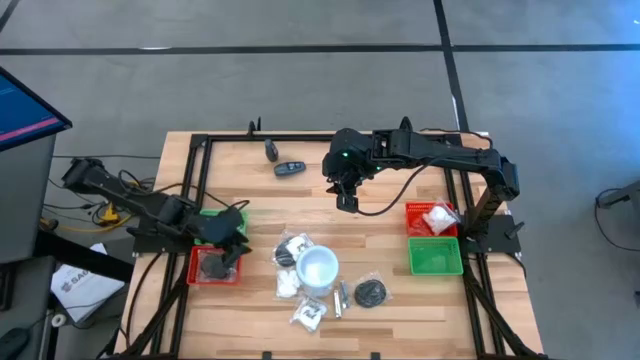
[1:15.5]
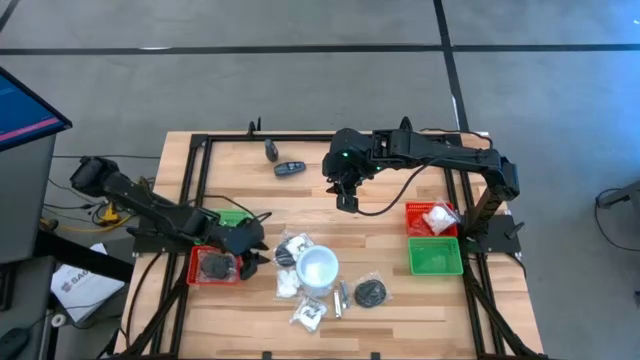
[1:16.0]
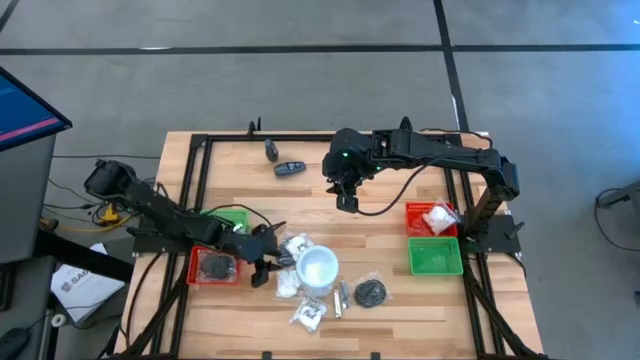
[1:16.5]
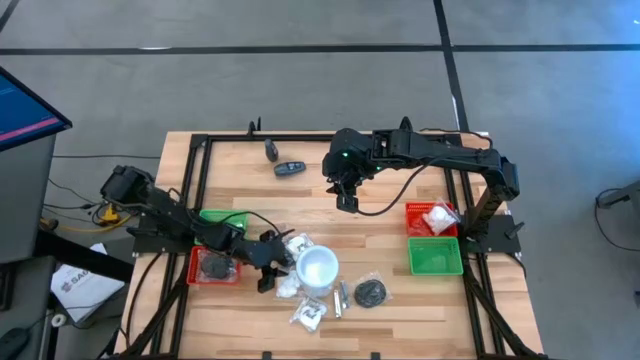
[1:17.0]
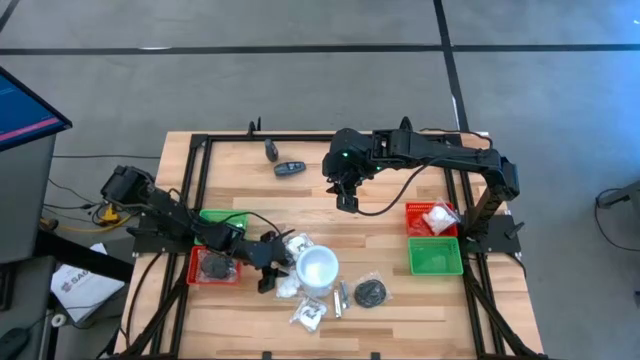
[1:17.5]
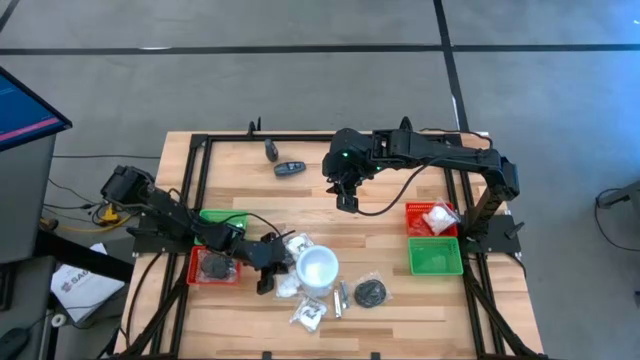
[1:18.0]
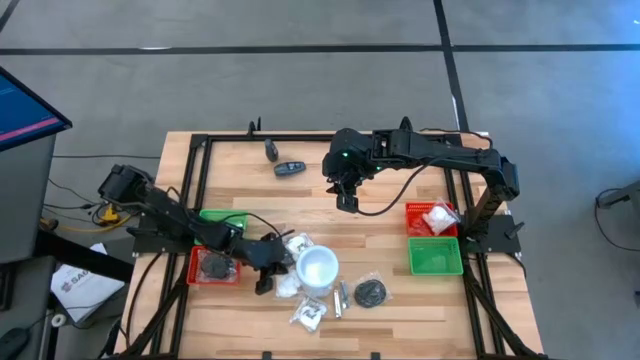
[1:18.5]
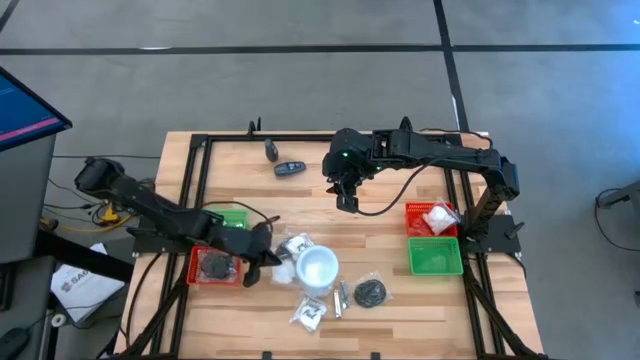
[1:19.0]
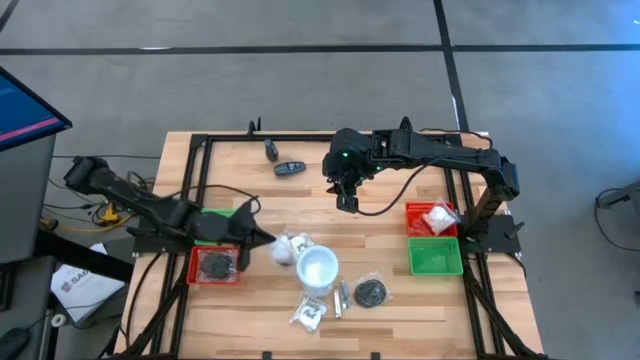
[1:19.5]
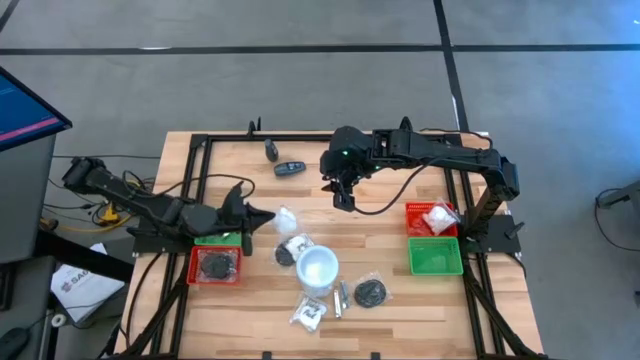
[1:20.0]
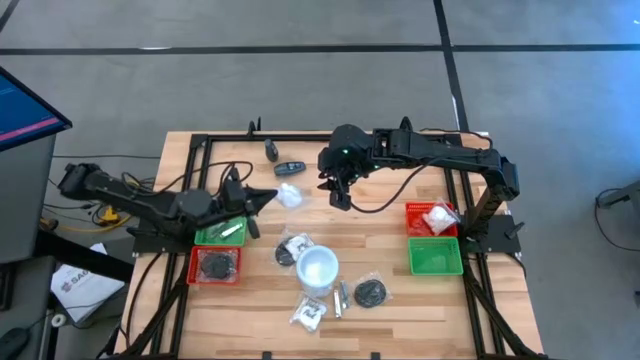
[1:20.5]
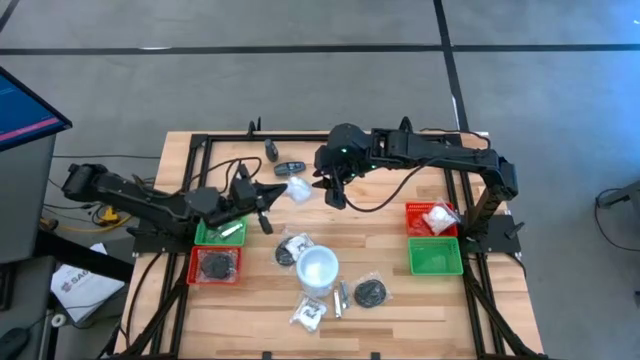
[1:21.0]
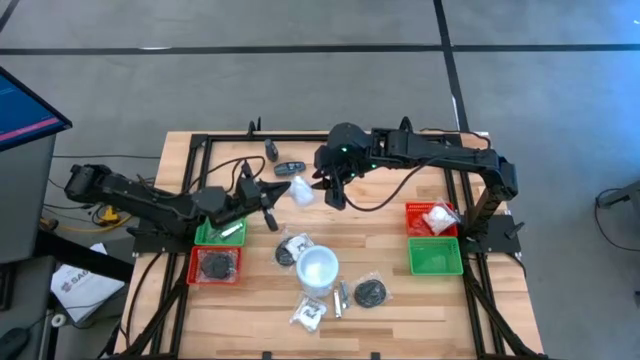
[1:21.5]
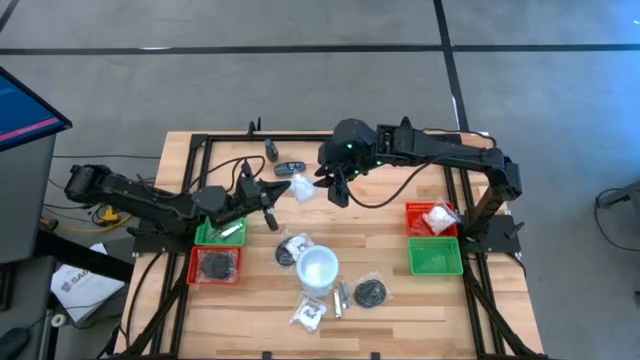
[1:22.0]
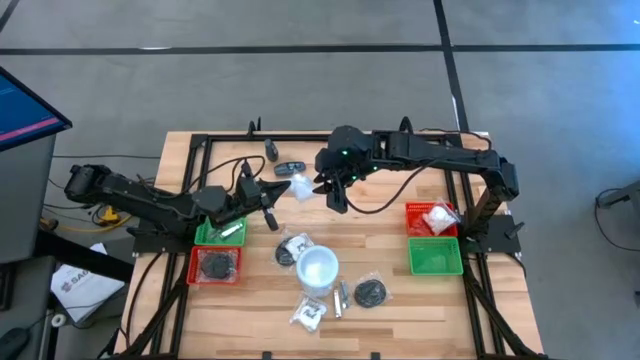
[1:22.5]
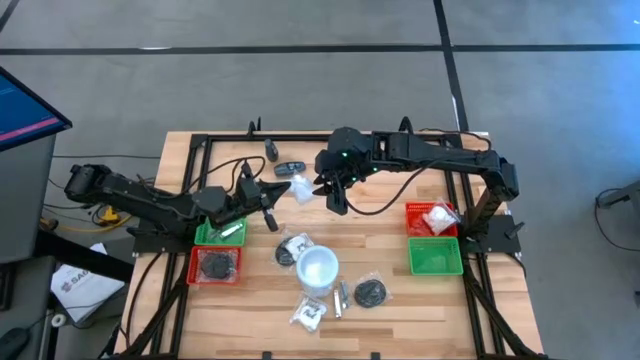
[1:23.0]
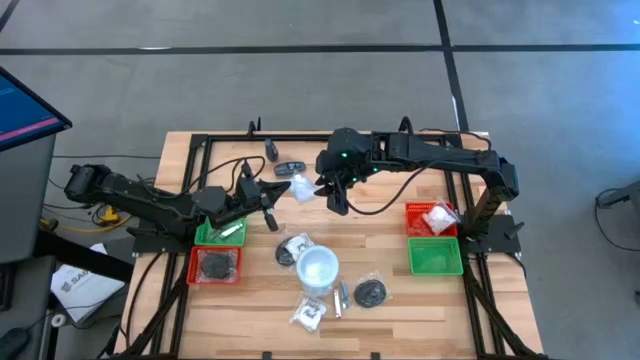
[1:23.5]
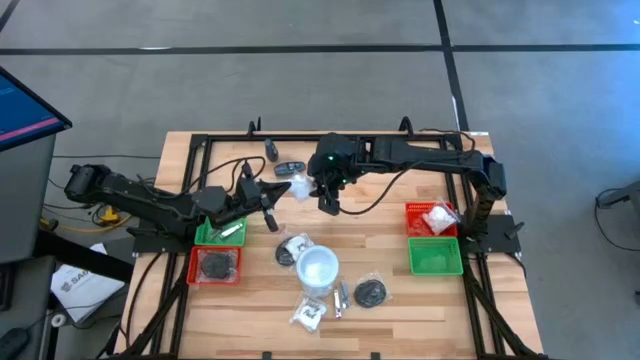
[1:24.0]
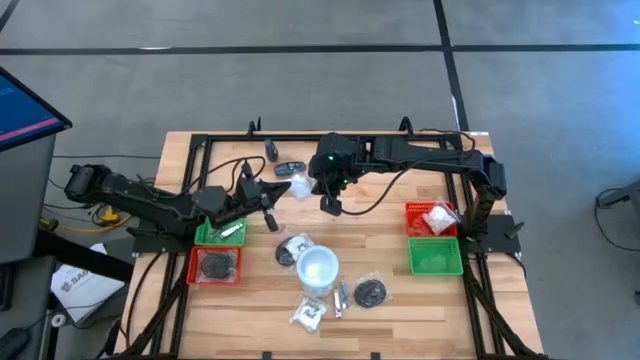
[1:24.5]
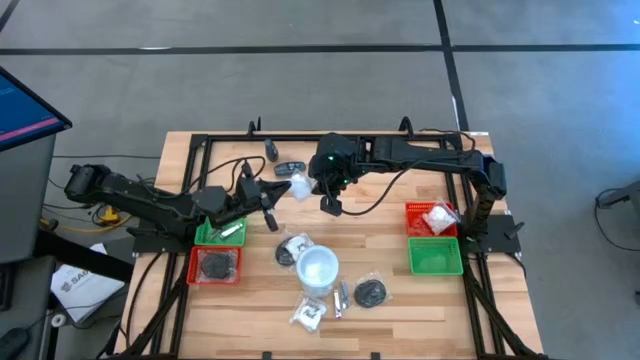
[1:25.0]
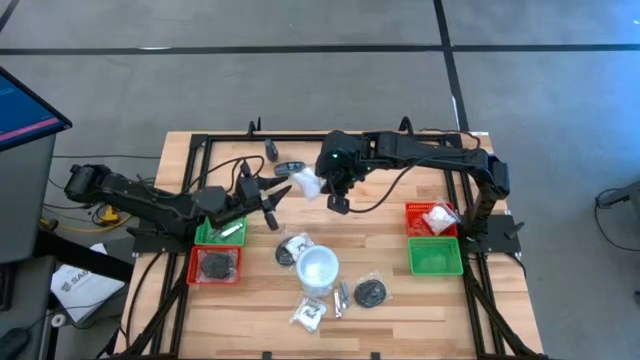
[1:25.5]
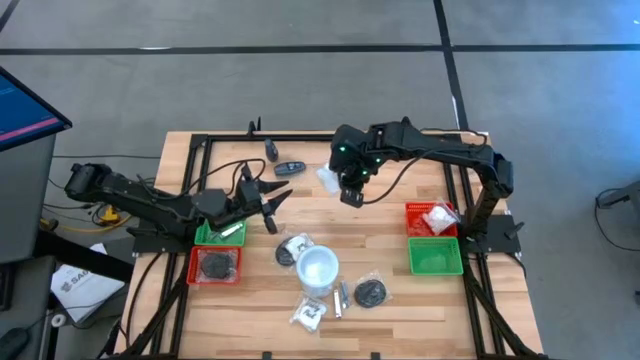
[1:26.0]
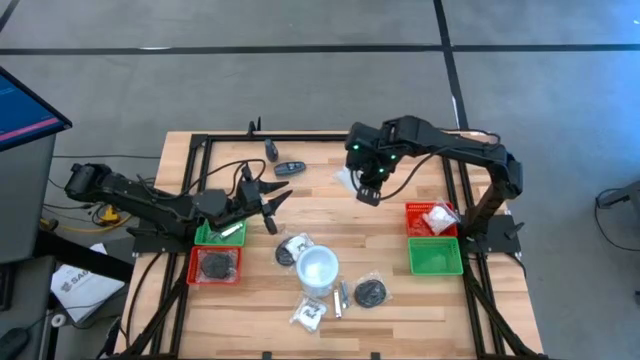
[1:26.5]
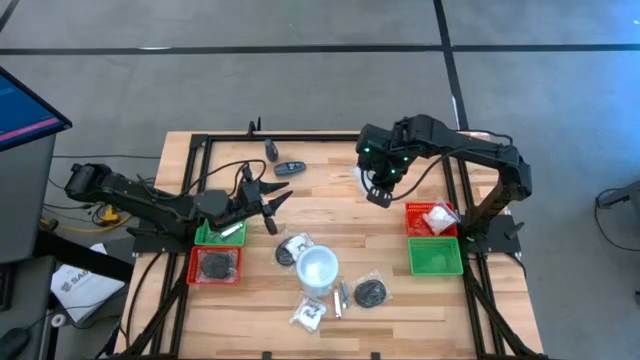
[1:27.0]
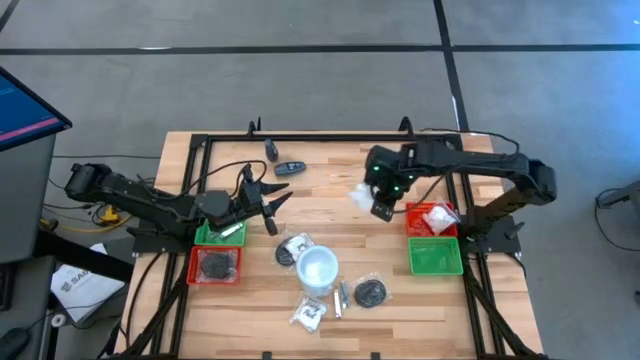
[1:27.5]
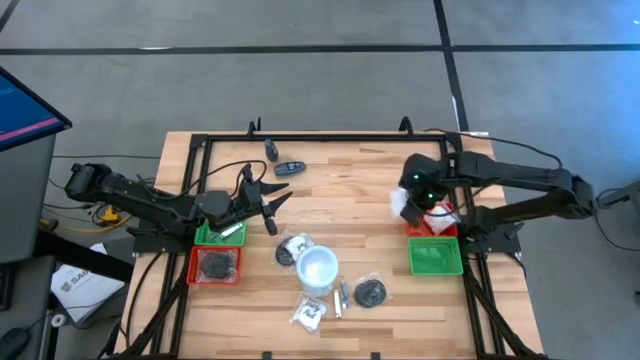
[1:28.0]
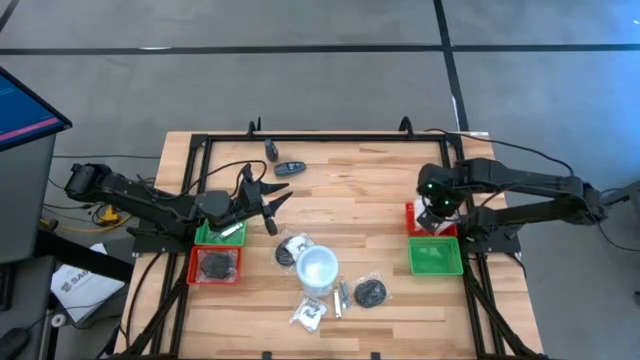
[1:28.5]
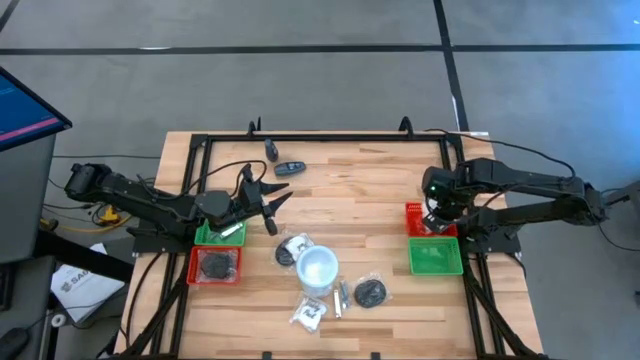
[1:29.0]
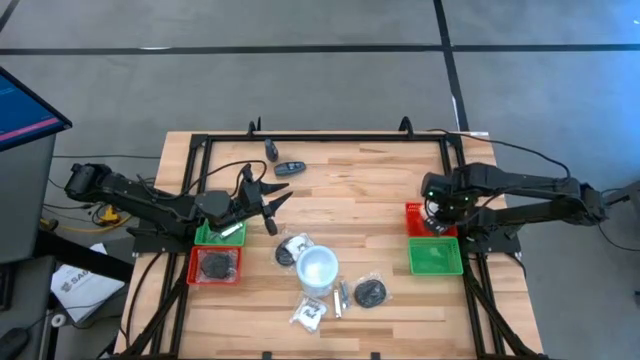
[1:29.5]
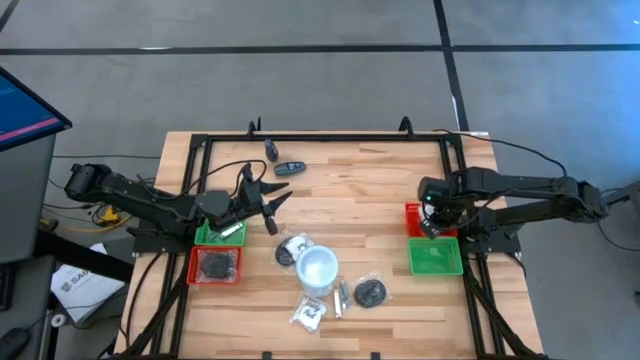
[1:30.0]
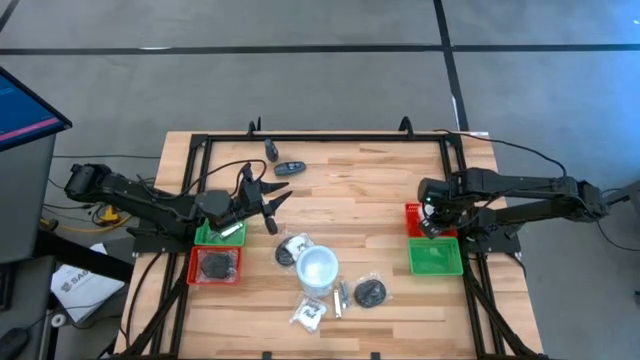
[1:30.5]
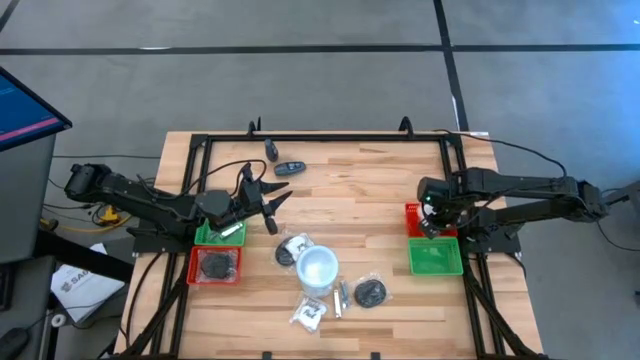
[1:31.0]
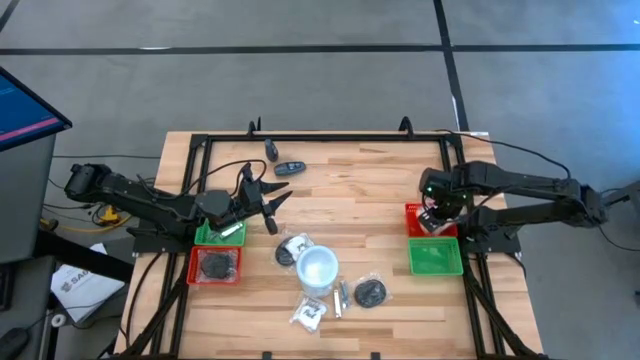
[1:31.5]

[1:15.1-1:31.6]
Task: Pick & Place Travel size toiletries
Put the white vanity pack into the right red bin

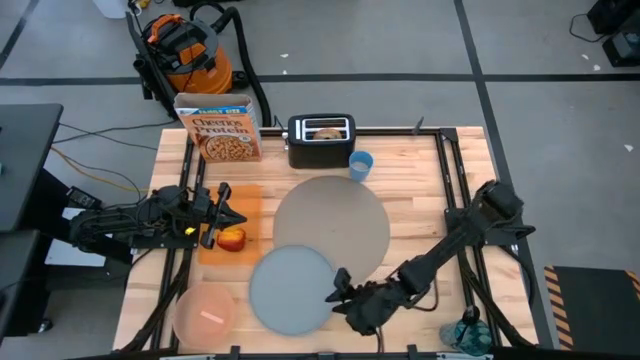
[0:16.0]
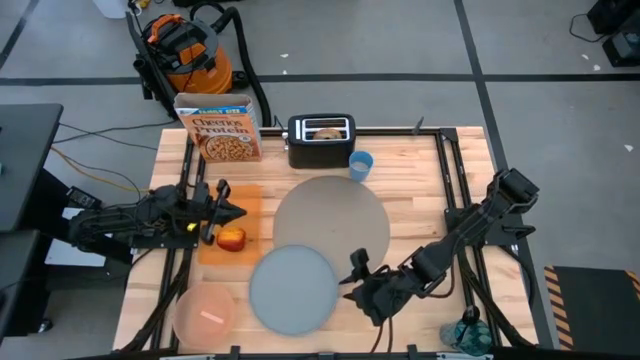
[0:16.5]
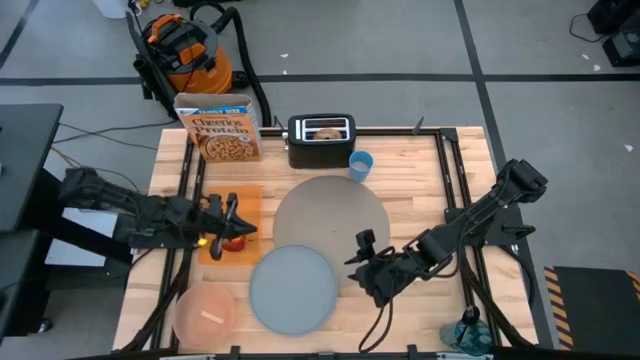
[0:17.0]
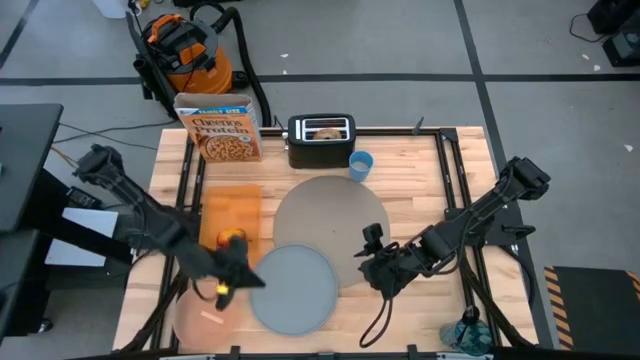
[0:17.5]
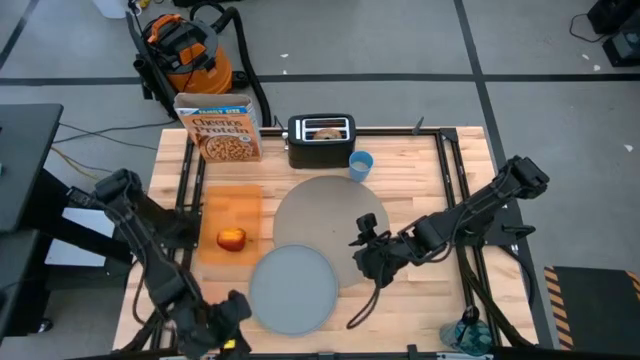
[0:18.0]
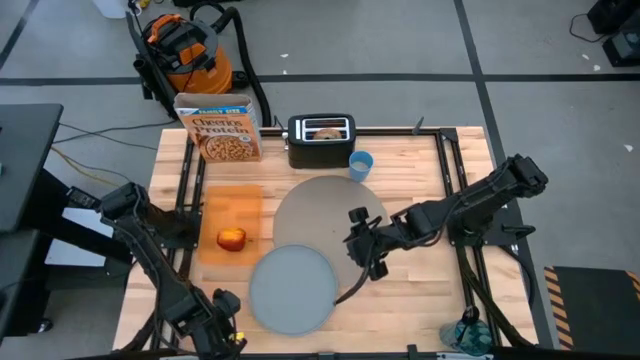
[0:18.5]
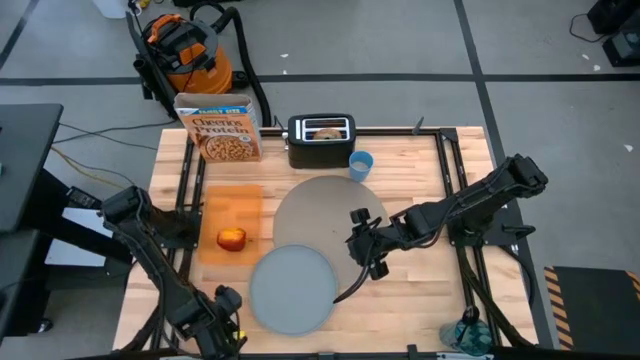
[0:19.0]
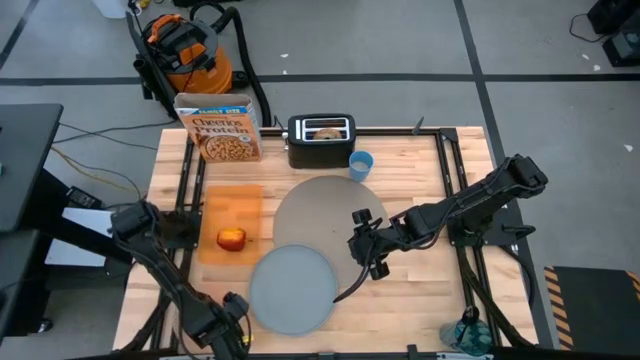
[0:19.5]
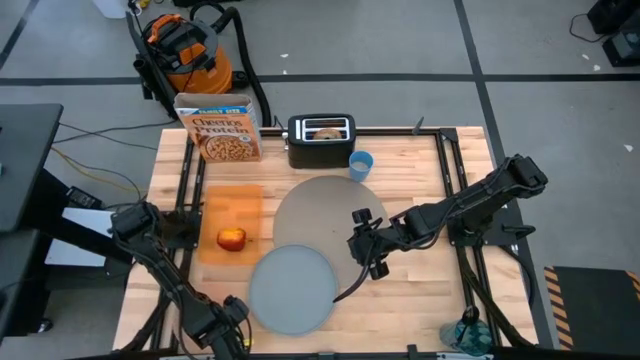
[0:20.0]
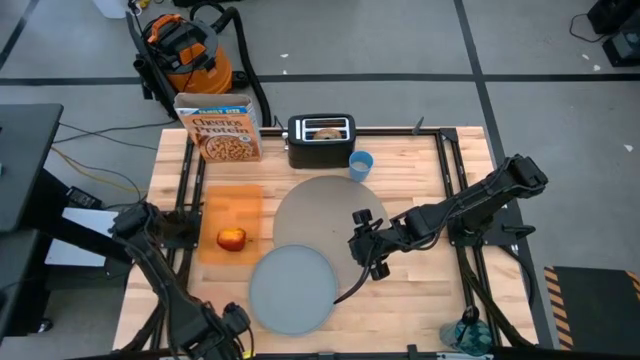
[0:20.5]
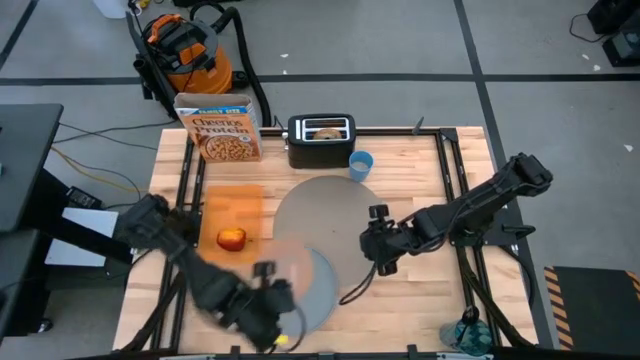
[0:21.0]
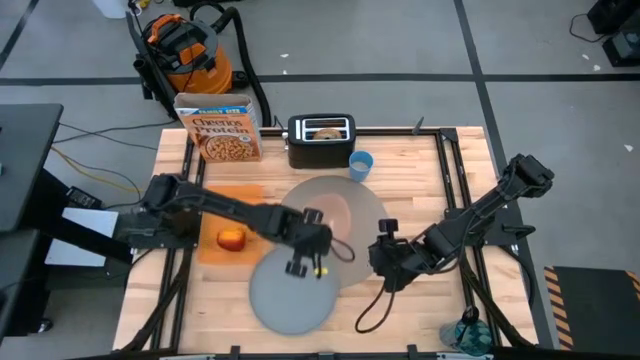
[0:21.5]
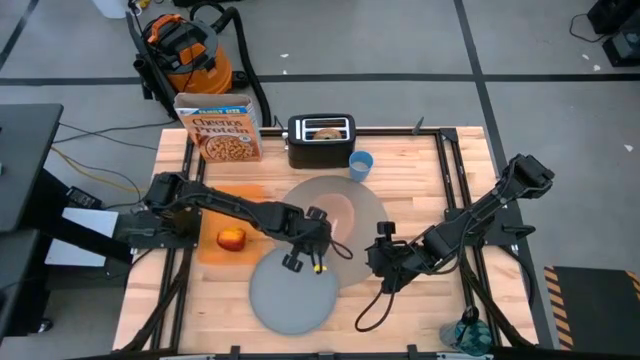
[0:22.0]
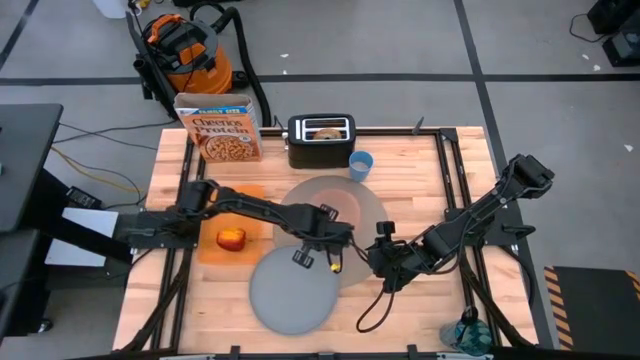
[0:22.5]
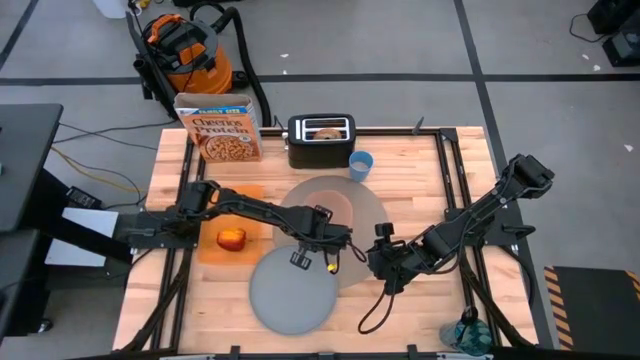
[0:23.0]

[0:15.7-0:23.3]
Task: Arrange a breakfast setting
Put the orange bowl on the gray table mat
